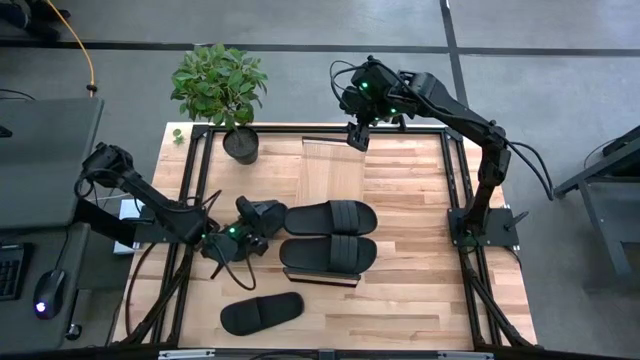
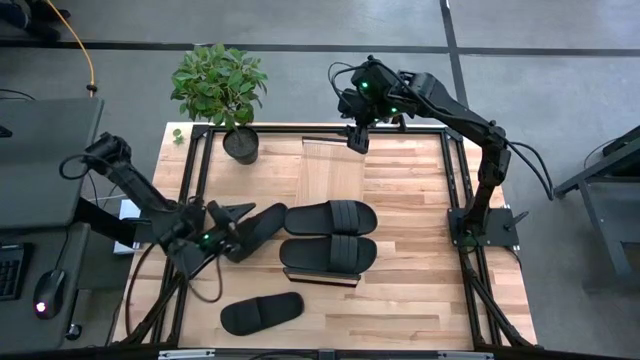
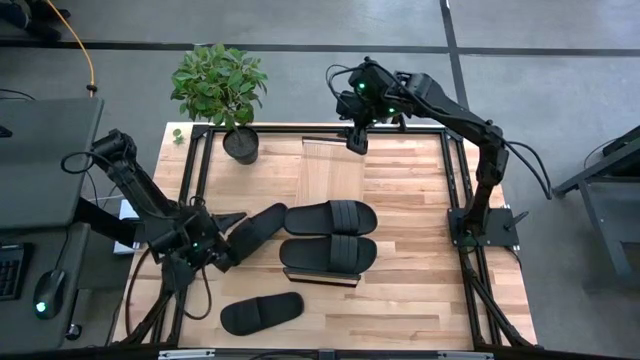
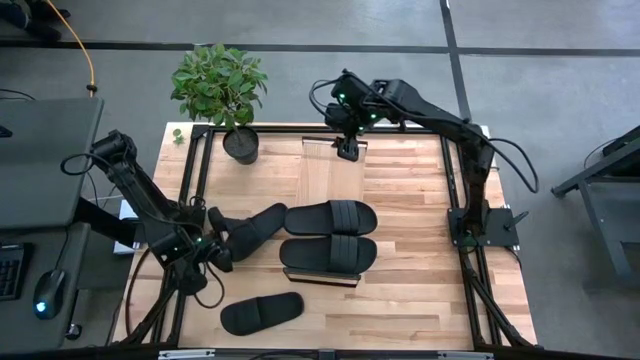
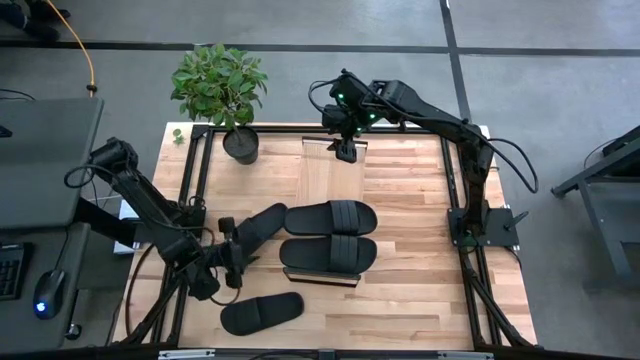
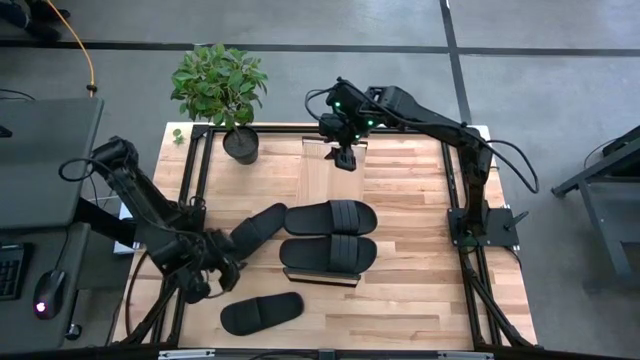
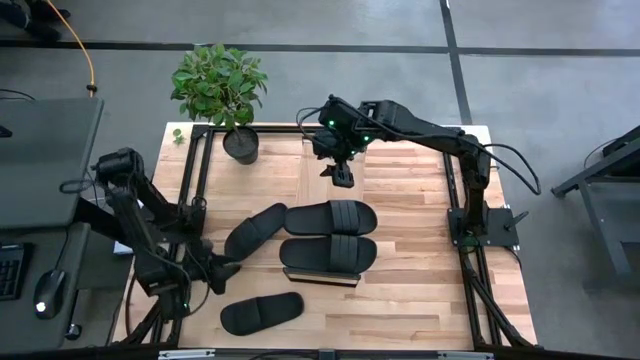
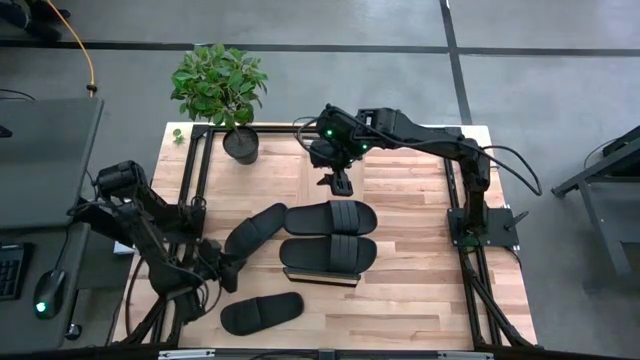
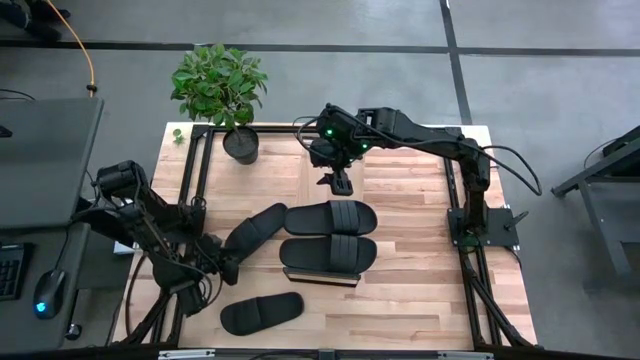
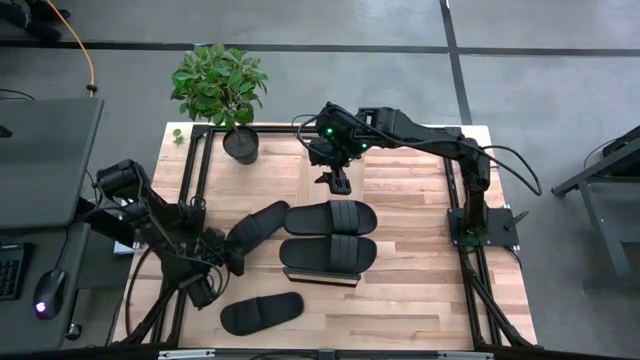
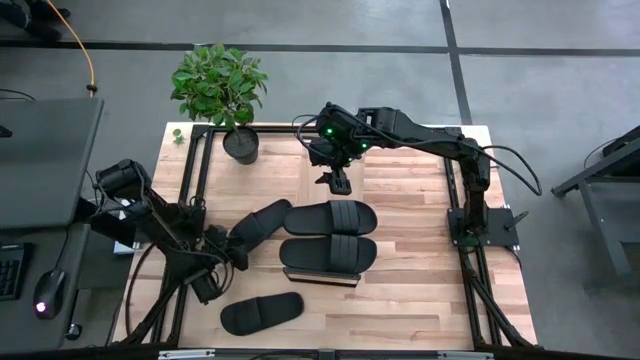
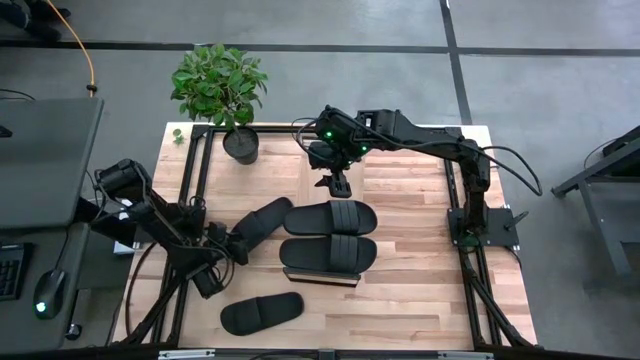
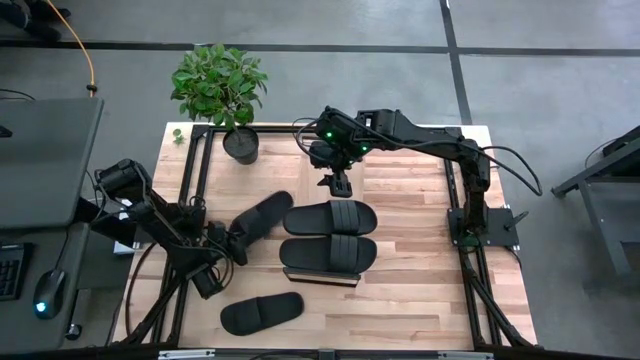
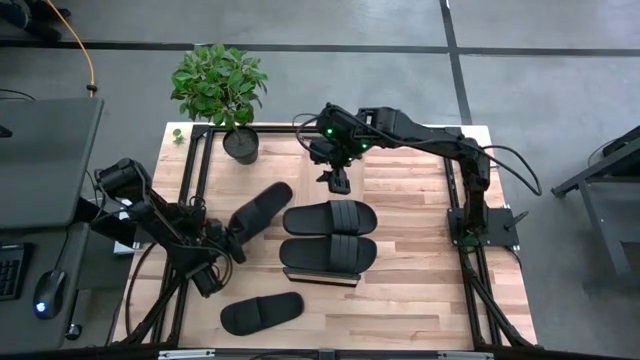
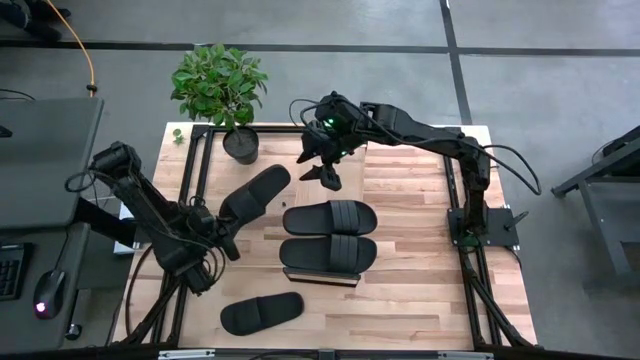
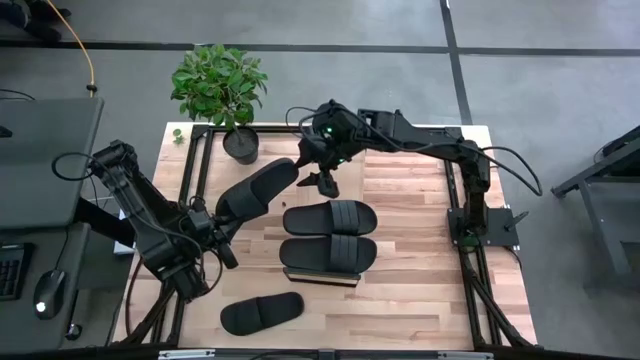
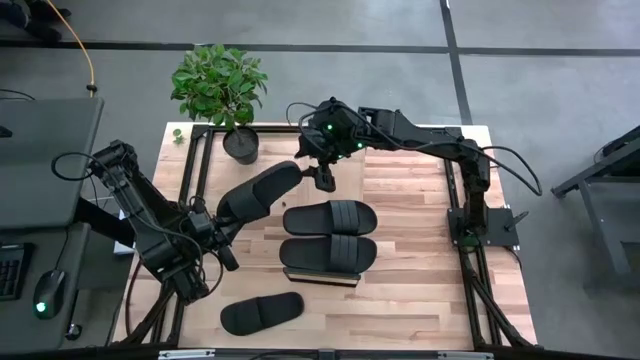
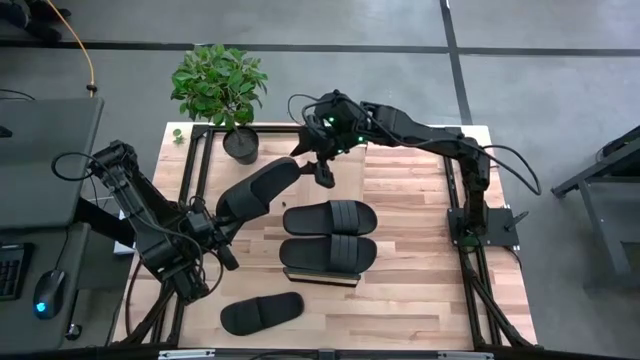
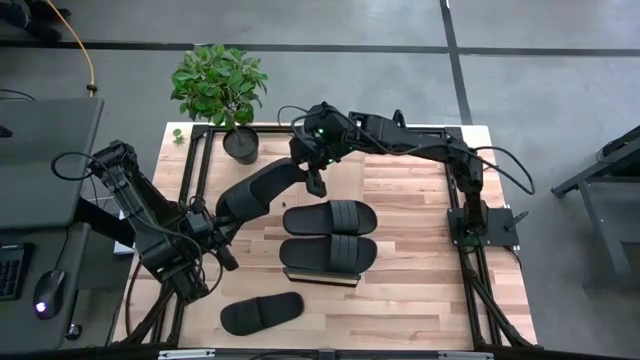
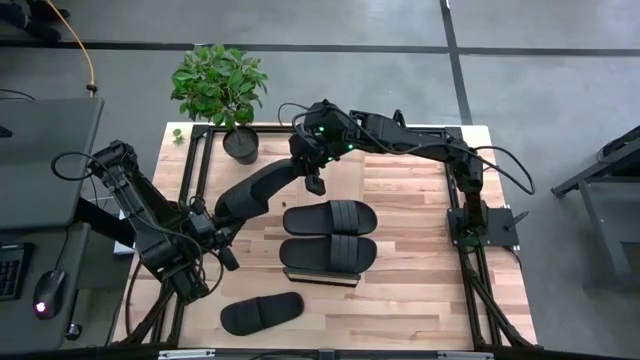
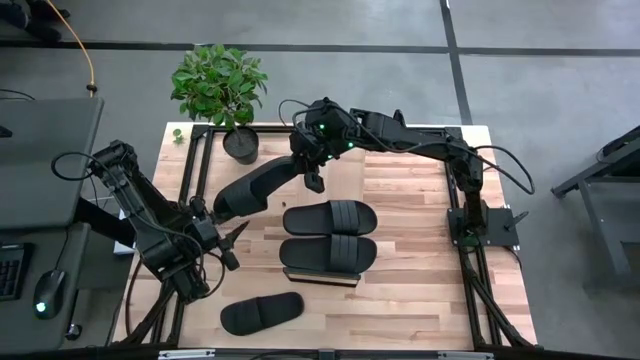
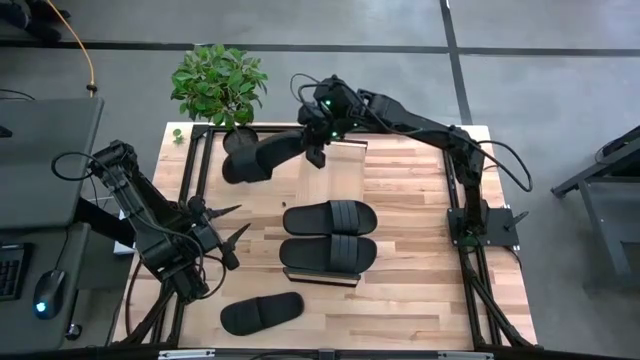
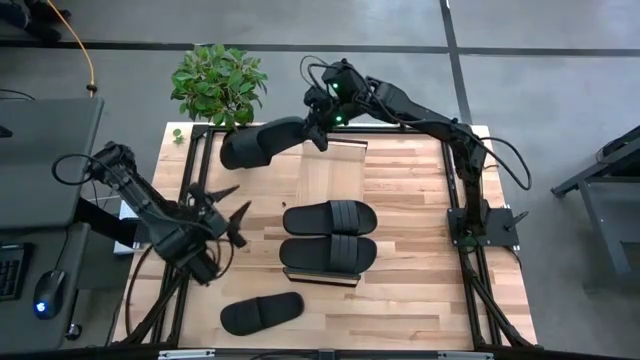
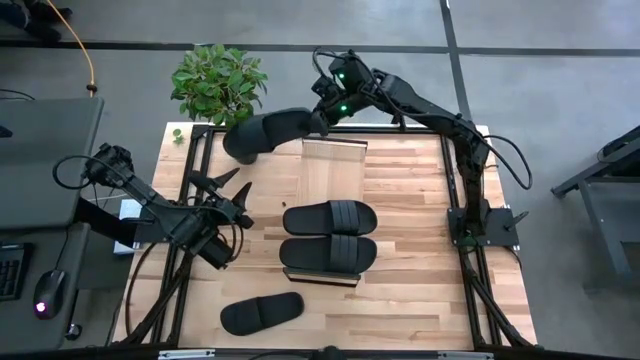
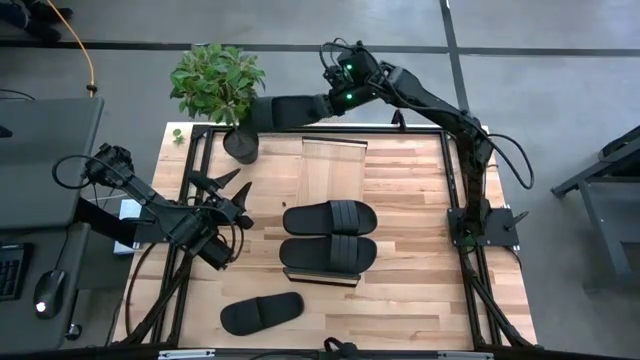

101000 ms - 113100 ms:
Task: Pick and place slides into the shelf
Put the black slide on the shelf

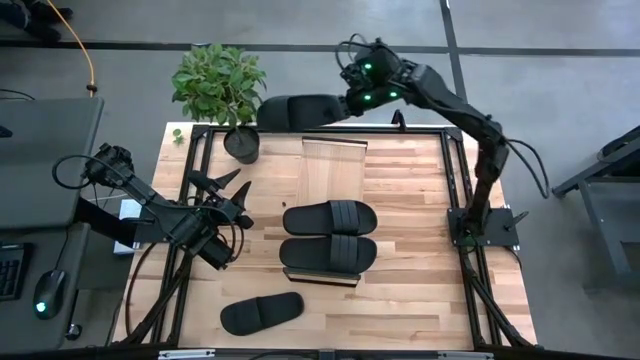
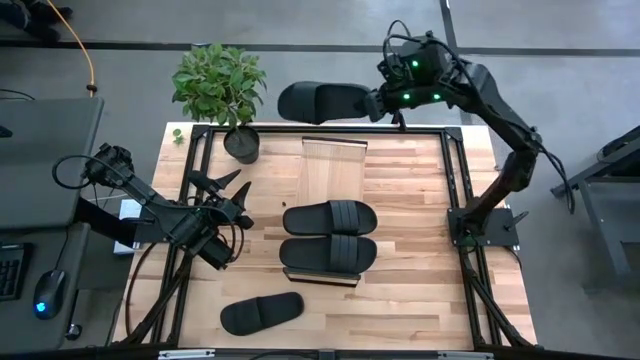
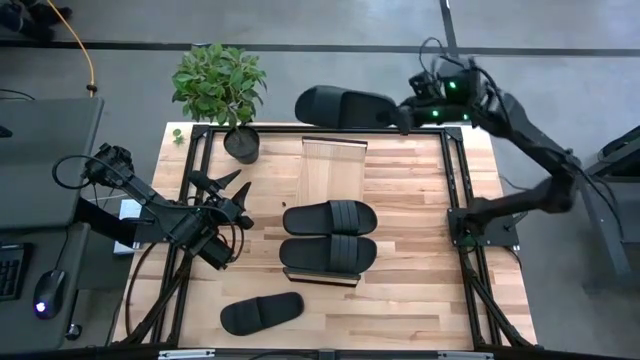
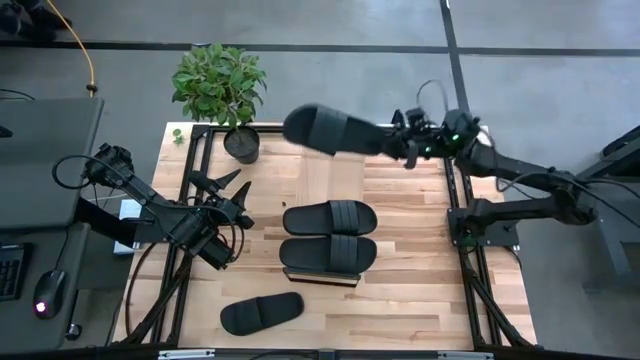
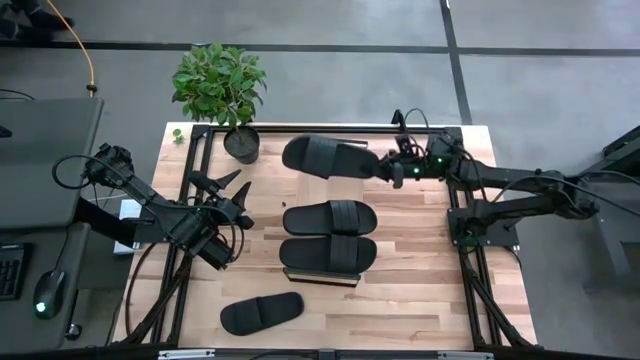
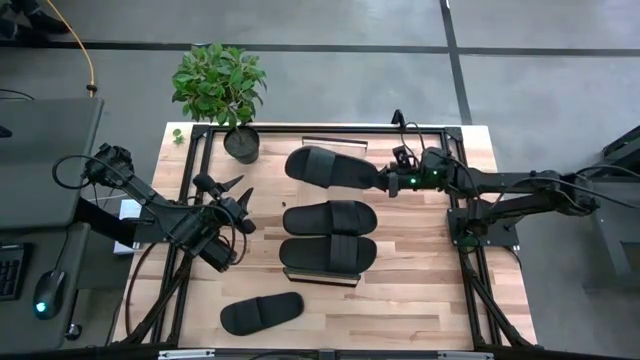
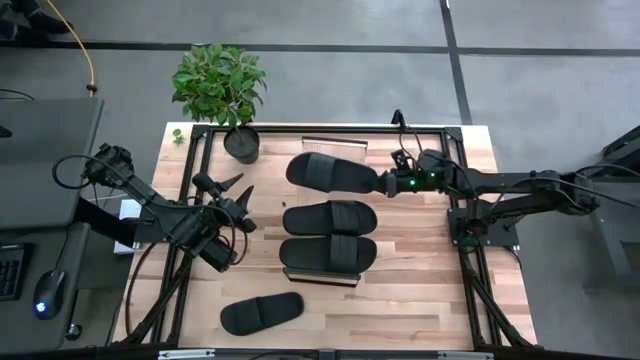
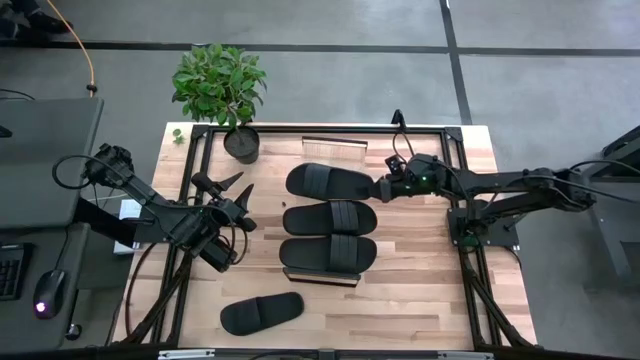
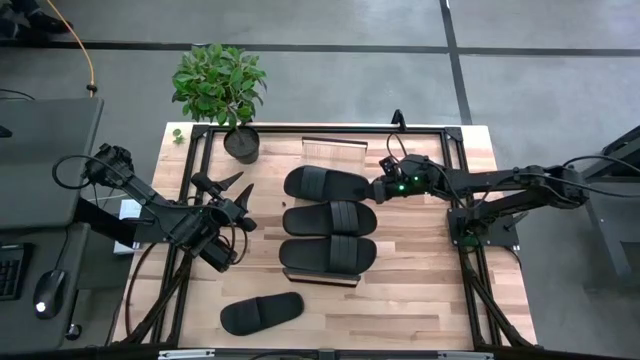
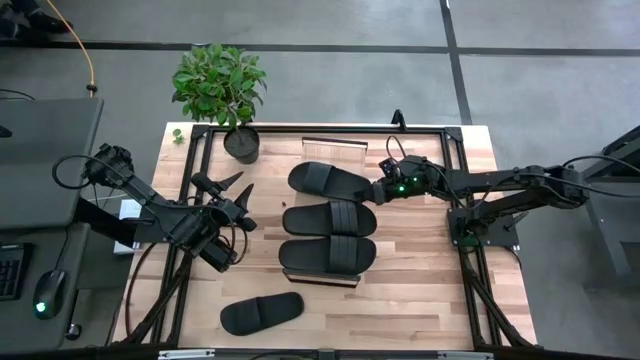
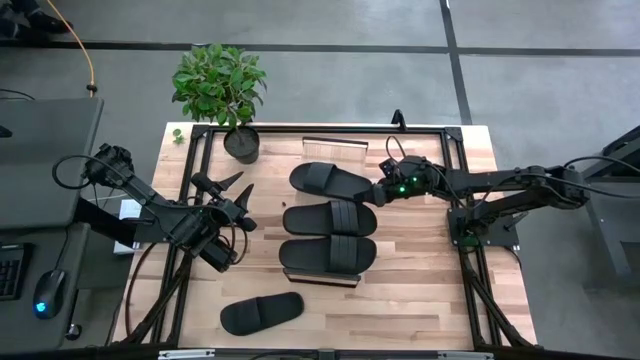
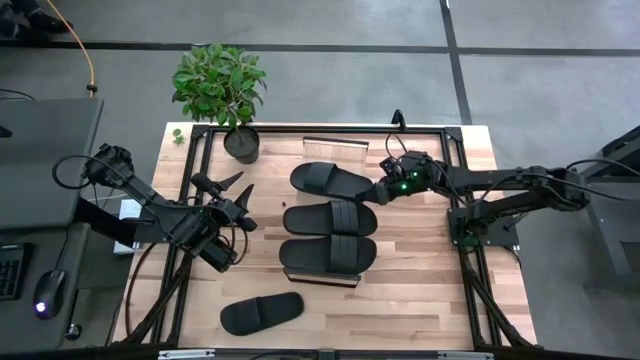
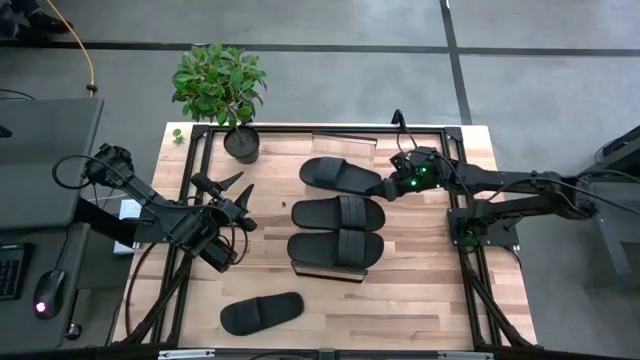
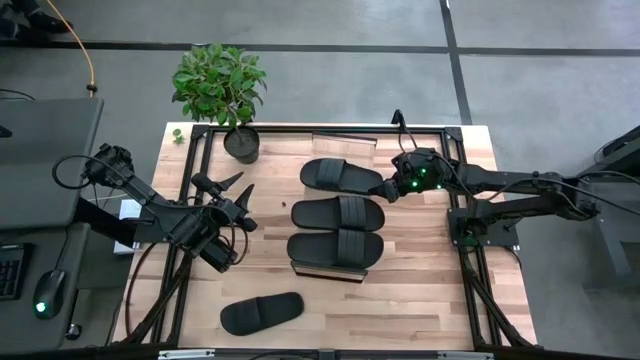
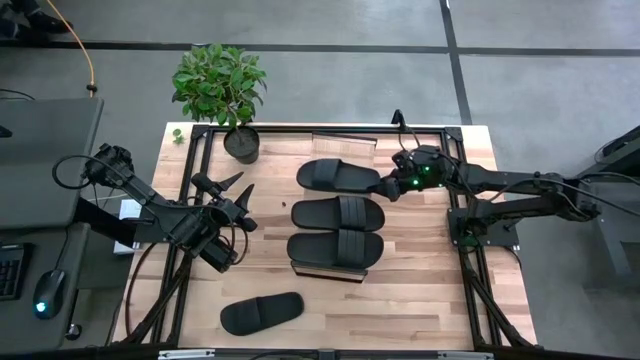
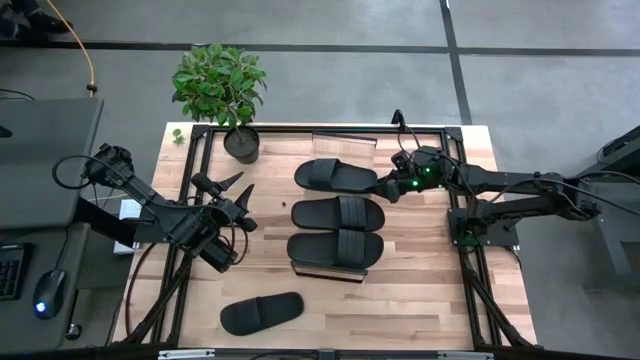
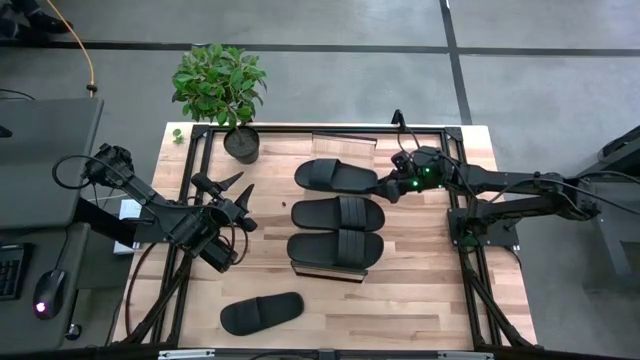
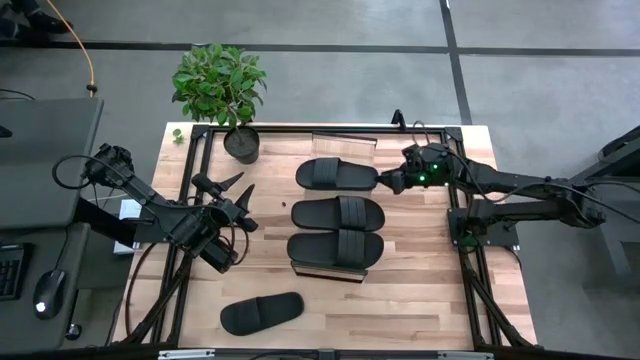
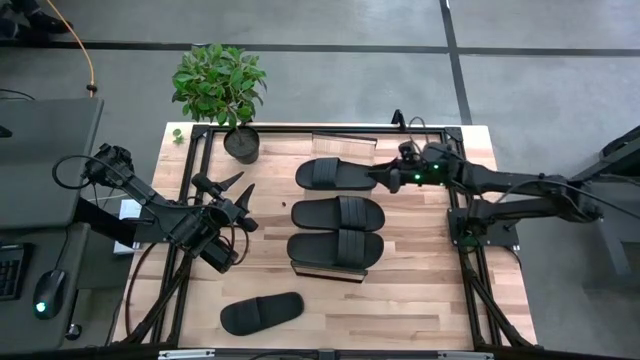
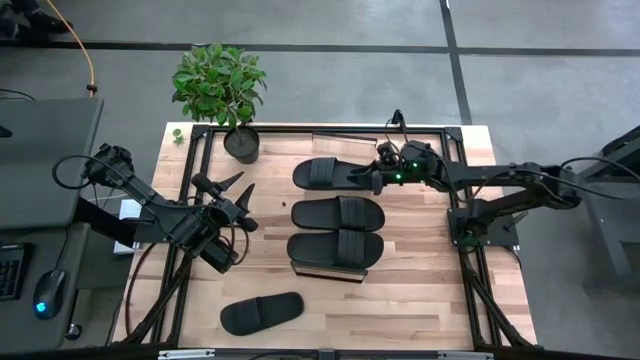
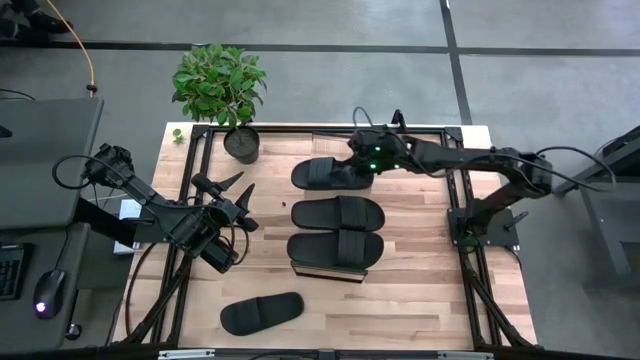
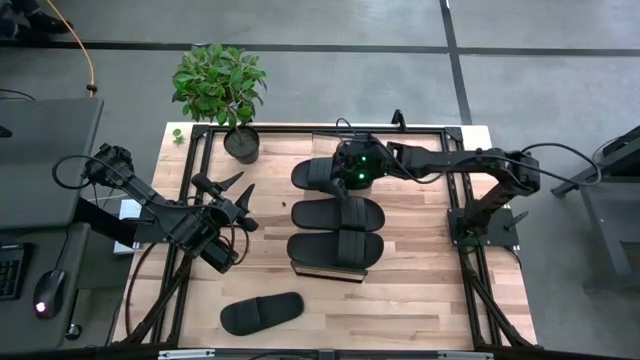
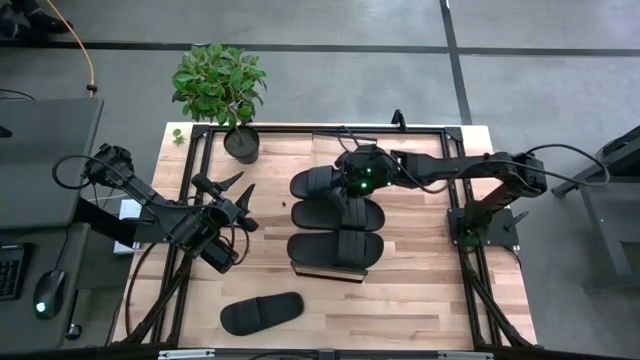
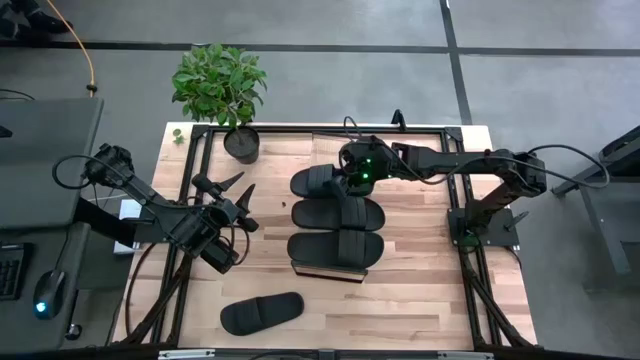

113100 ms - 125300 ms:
Put the black slide on the shelf
